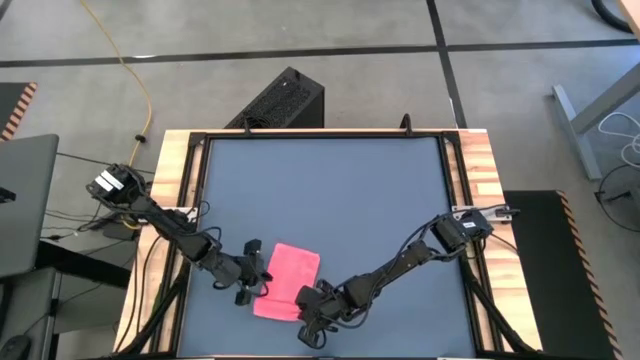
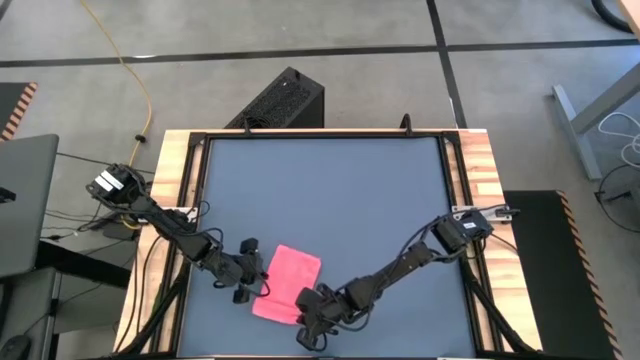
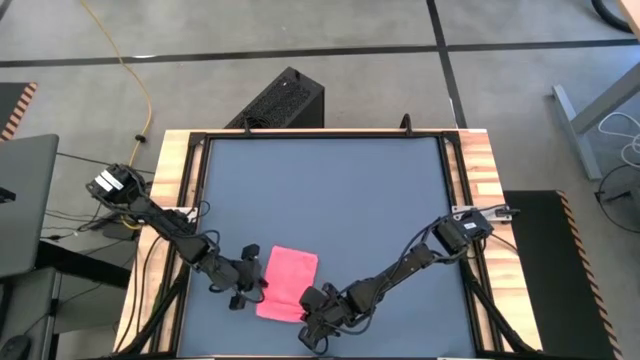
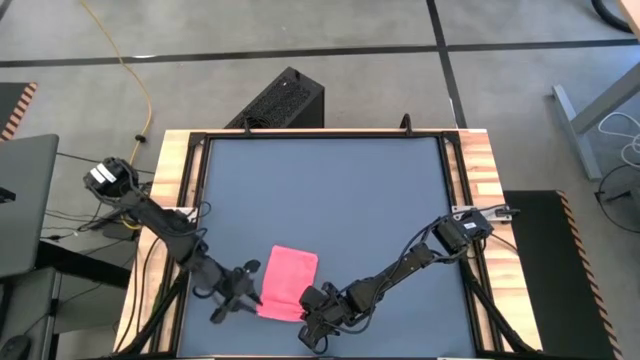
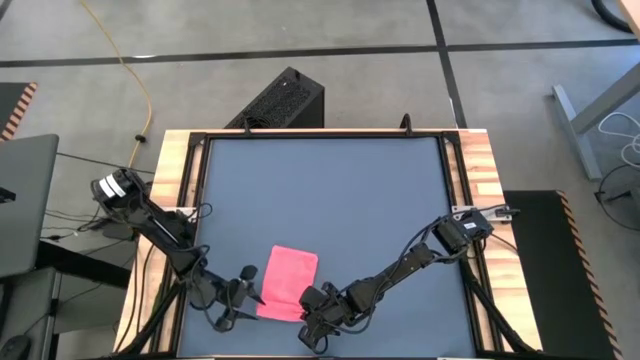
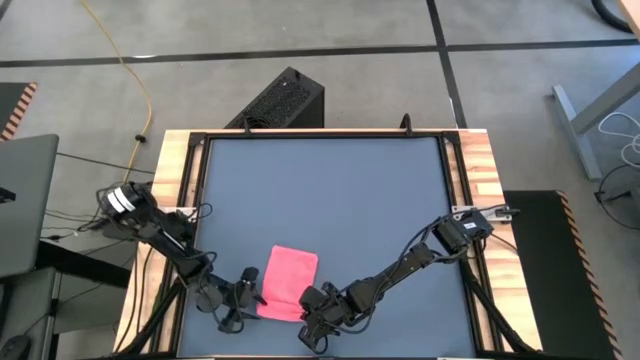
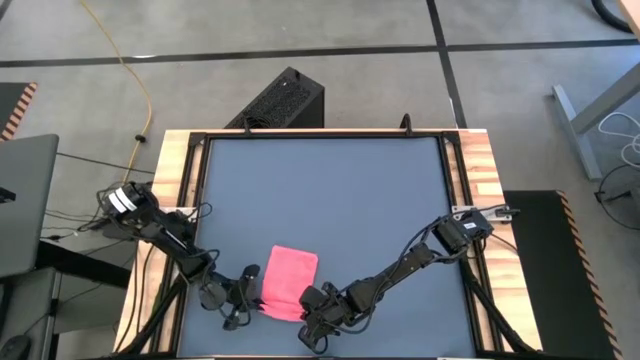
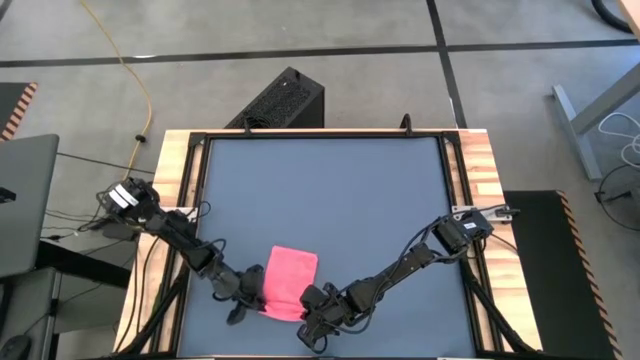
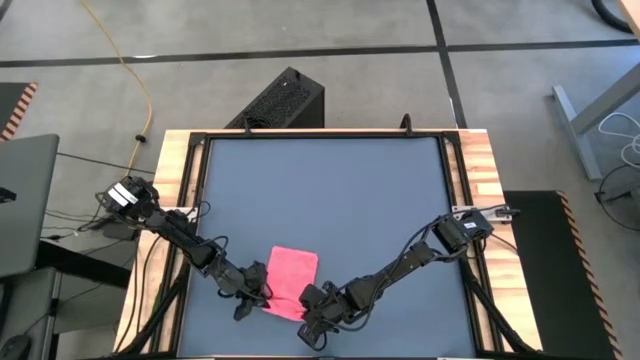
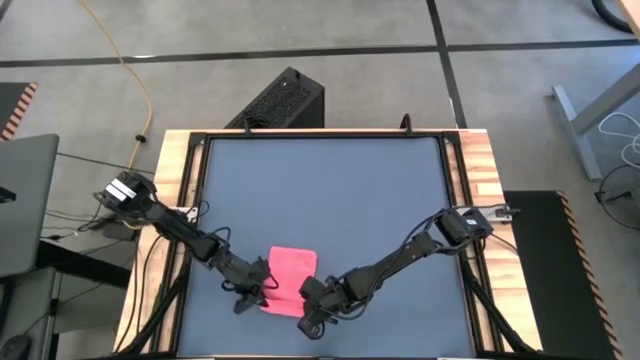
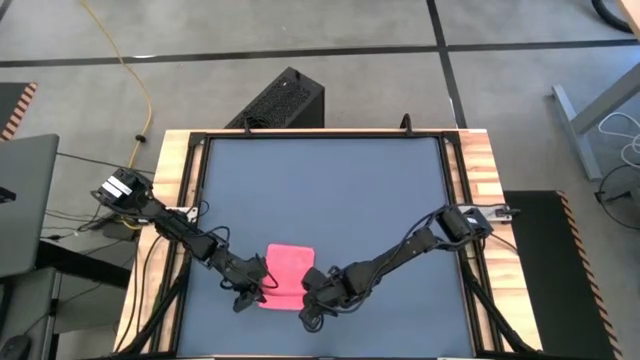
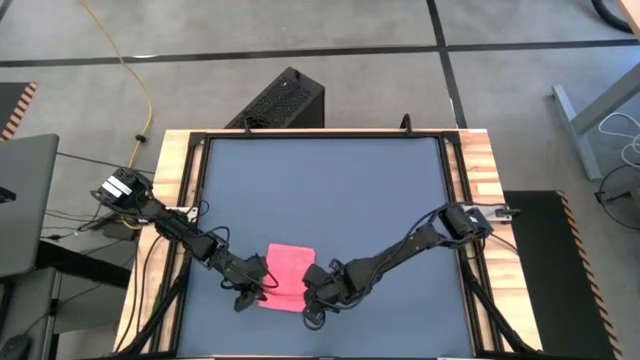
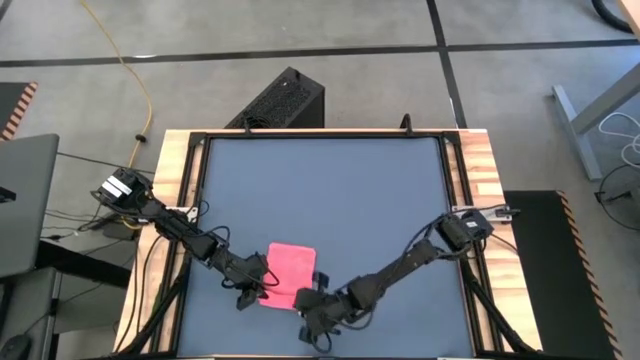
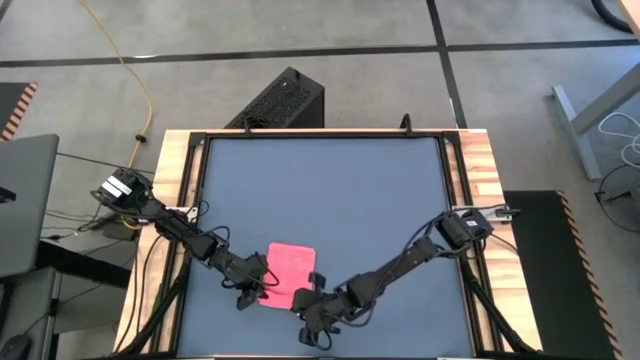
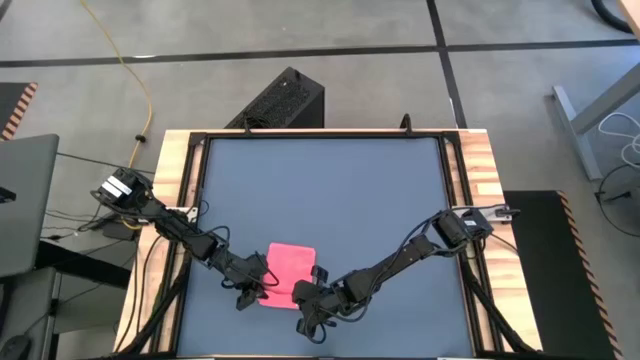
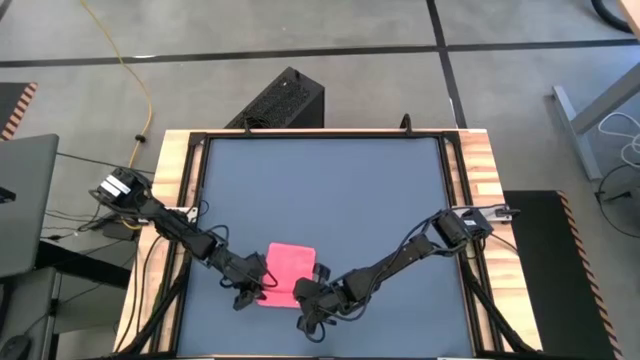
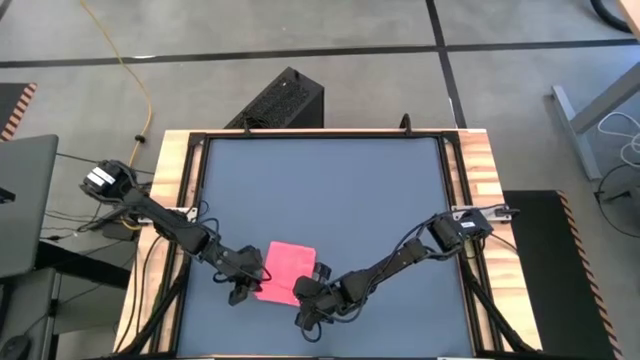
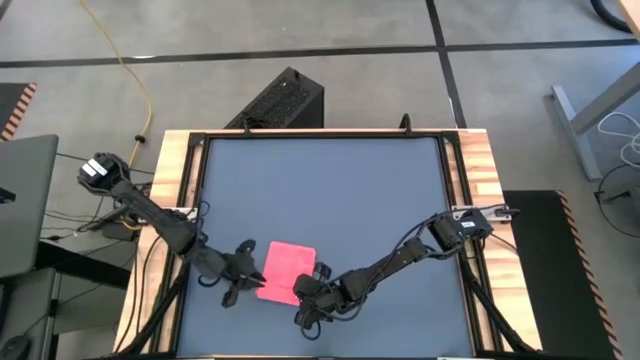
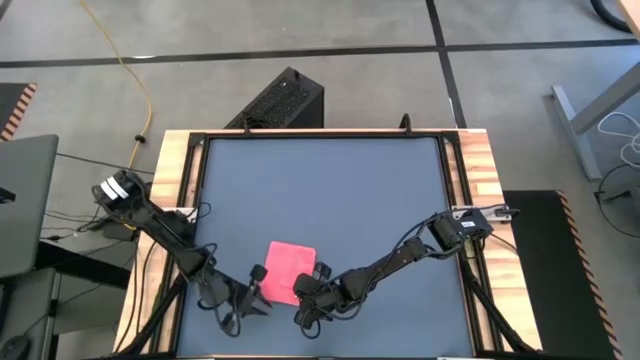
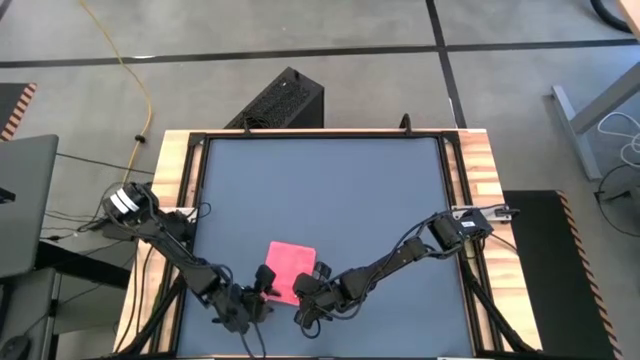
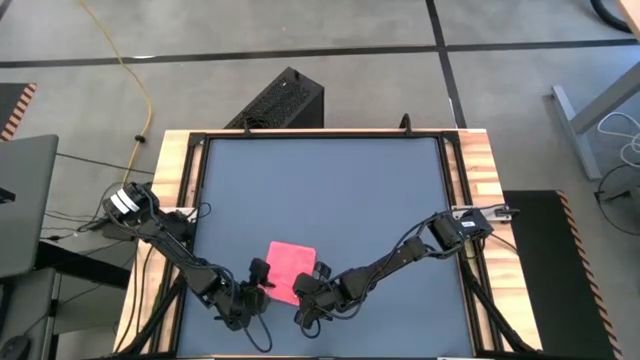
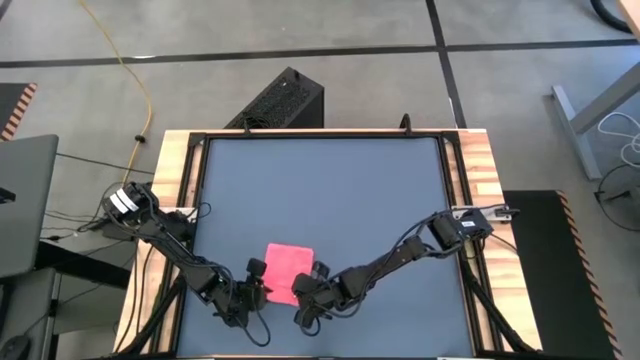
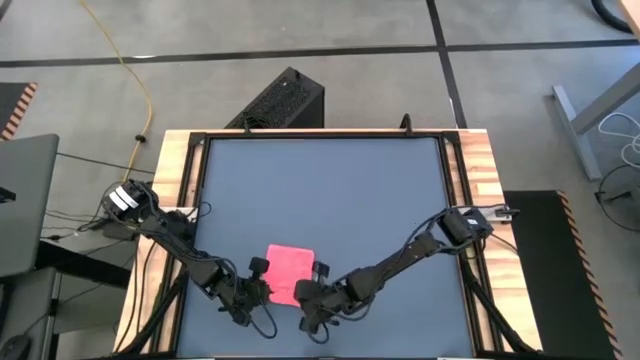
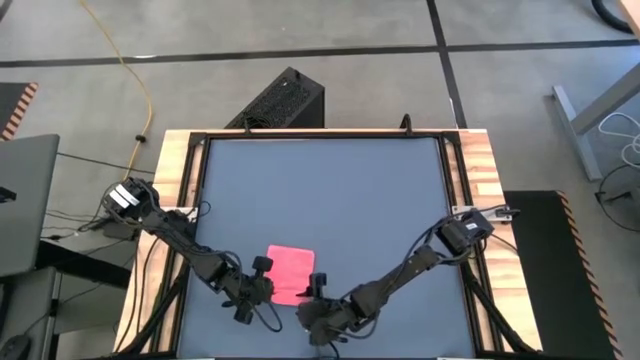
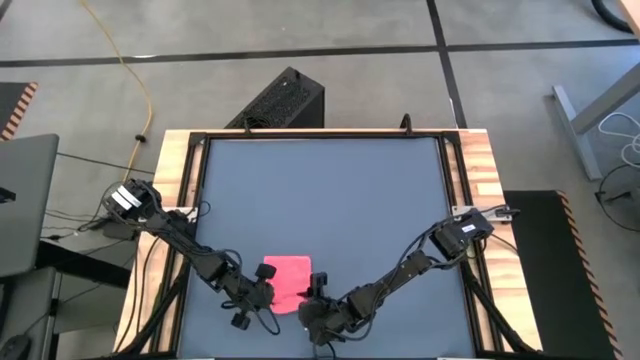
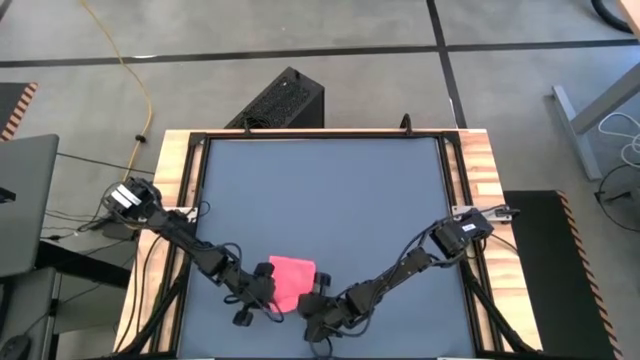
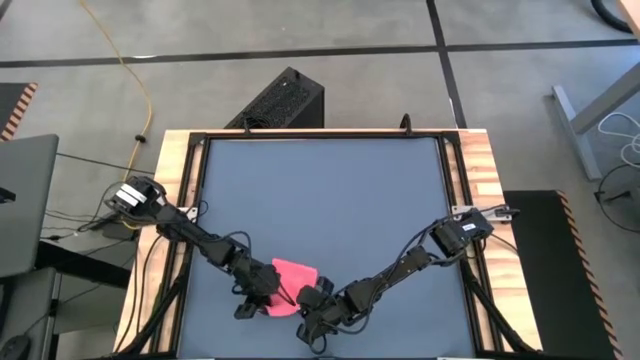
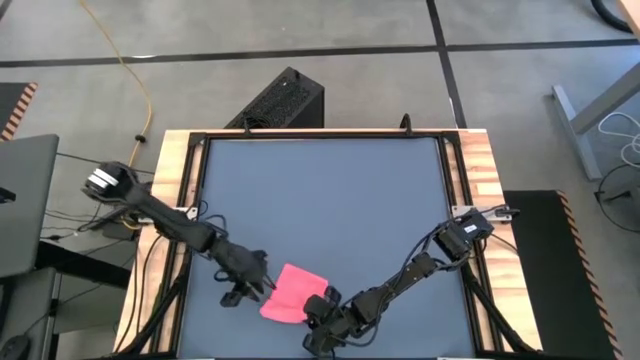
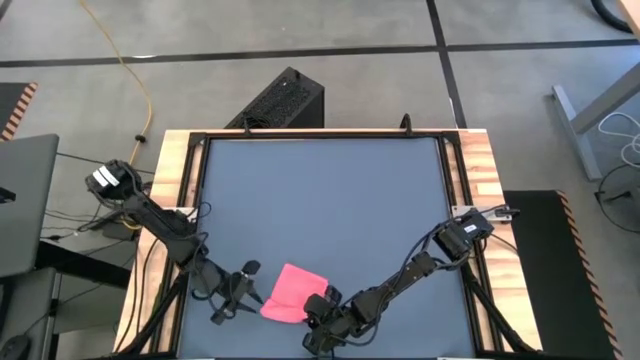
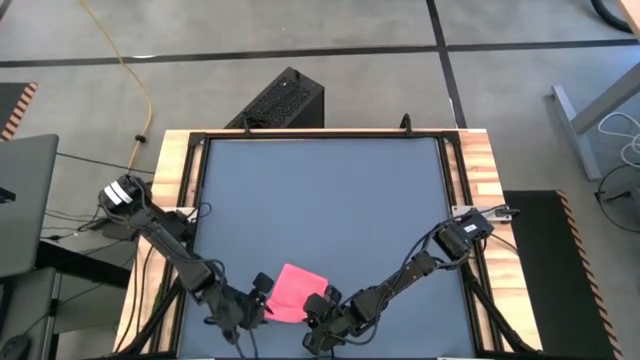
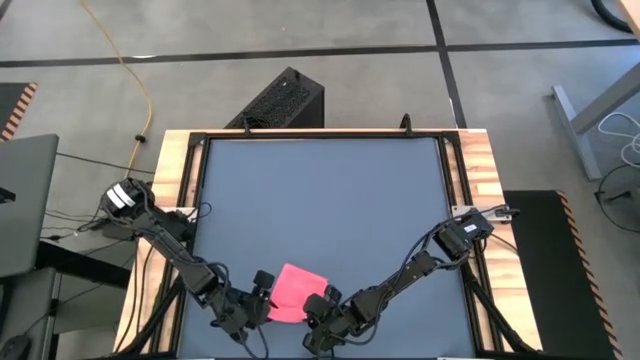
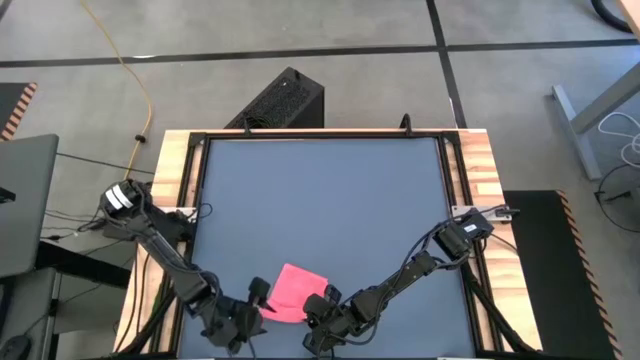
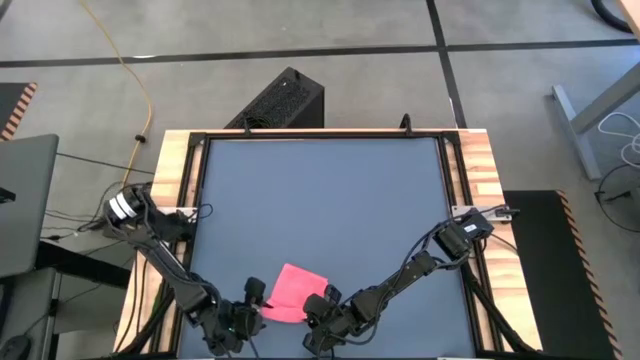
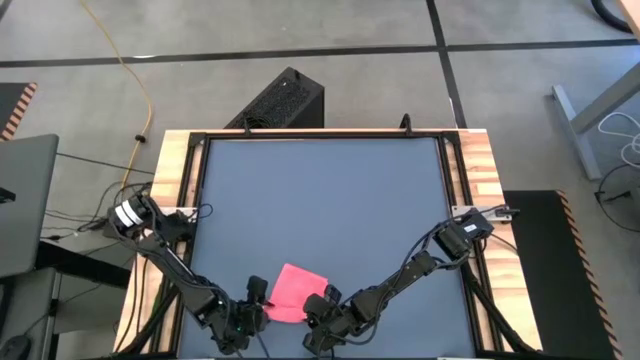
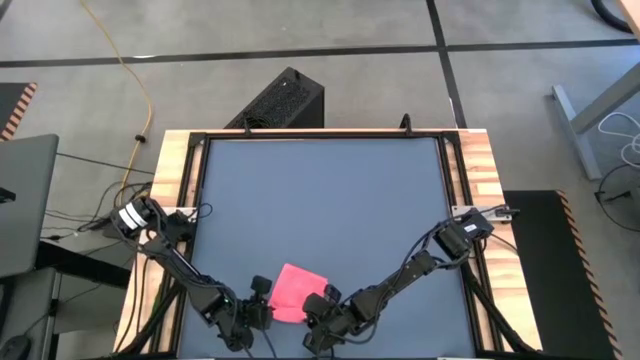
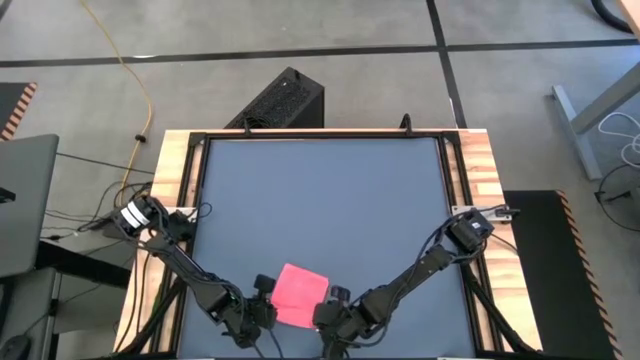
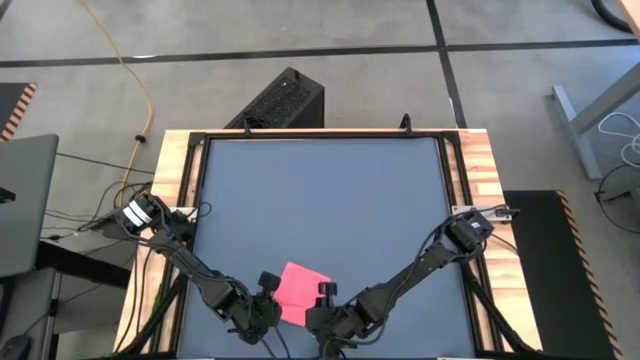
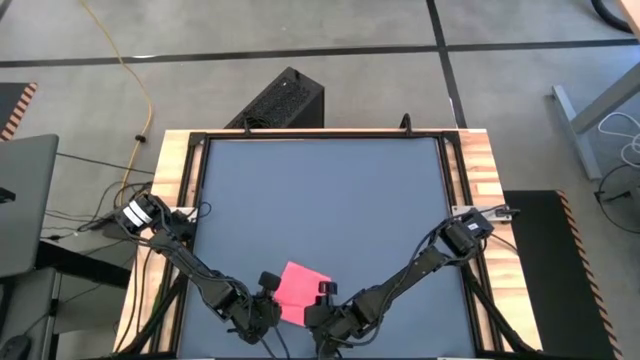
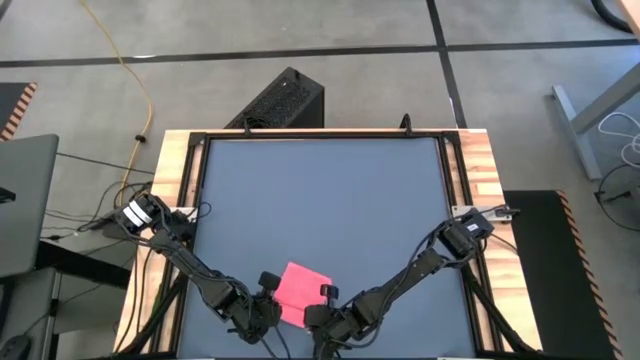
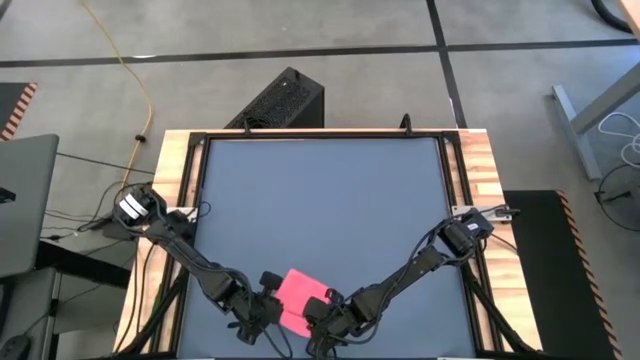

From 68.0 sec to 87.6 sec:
Task: Roll towel
Roll the pink towel
